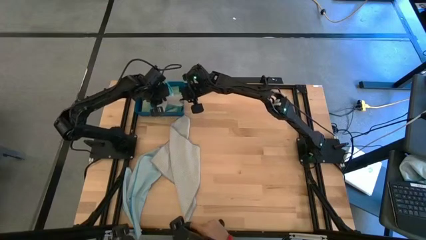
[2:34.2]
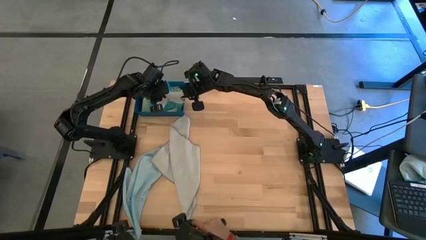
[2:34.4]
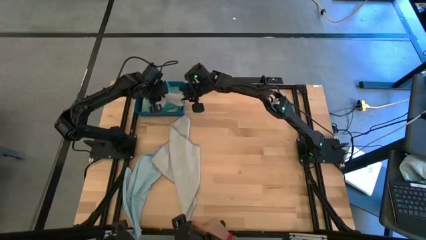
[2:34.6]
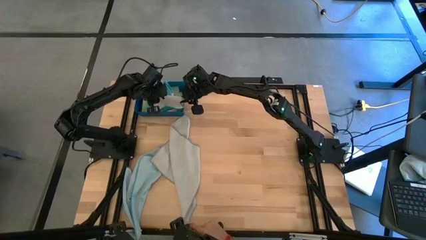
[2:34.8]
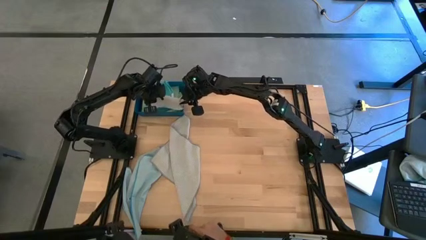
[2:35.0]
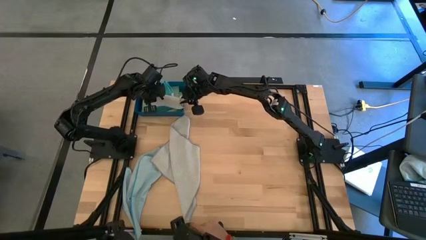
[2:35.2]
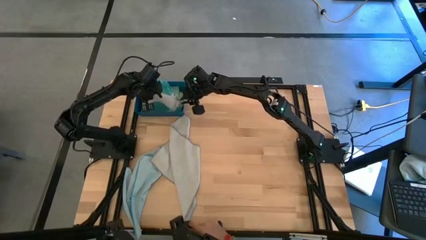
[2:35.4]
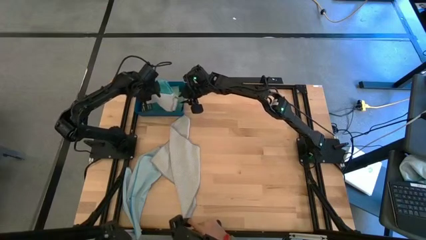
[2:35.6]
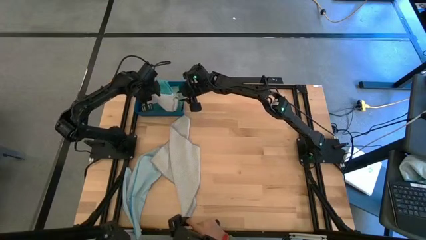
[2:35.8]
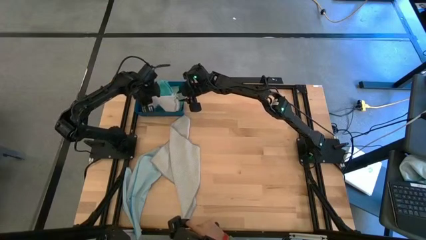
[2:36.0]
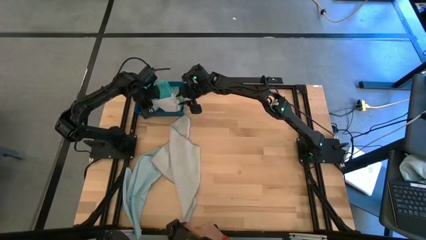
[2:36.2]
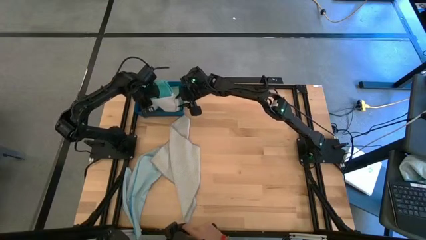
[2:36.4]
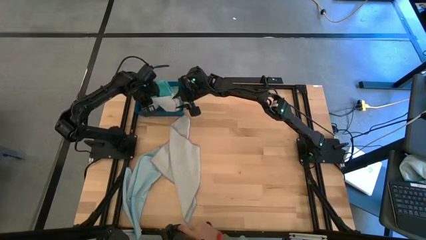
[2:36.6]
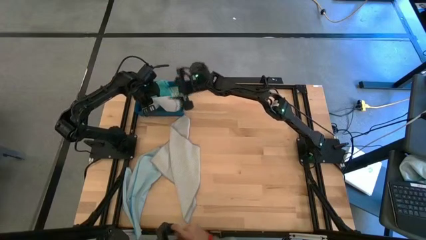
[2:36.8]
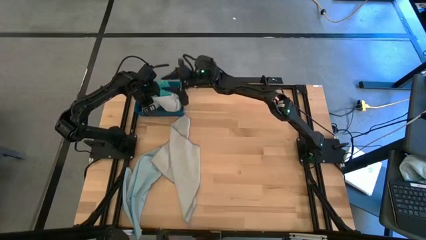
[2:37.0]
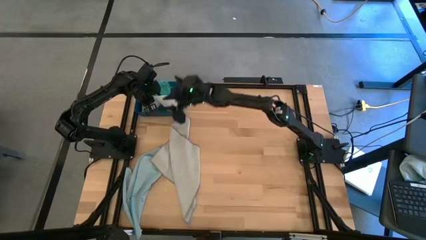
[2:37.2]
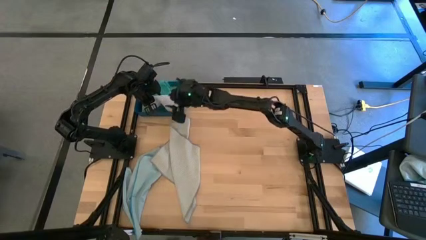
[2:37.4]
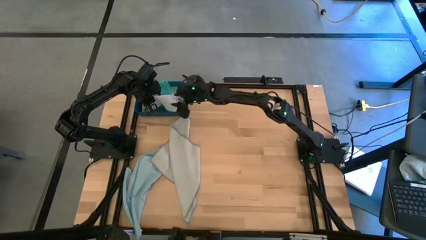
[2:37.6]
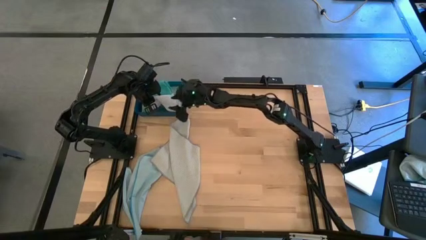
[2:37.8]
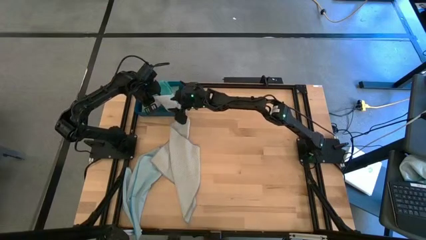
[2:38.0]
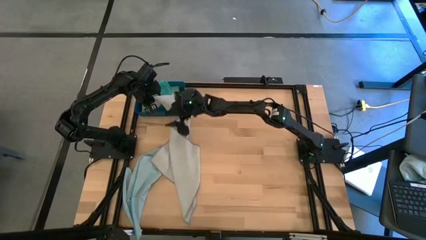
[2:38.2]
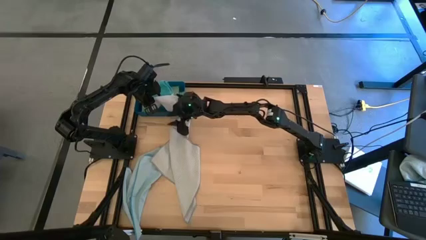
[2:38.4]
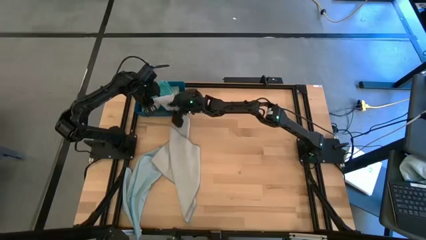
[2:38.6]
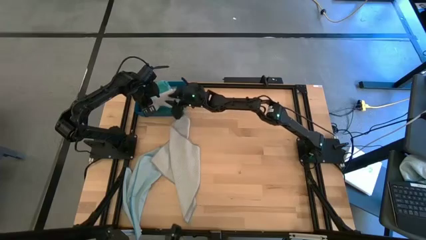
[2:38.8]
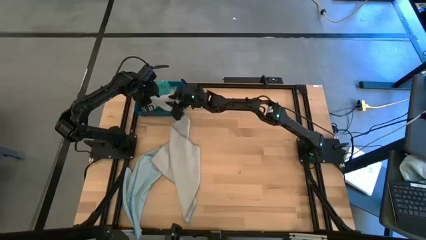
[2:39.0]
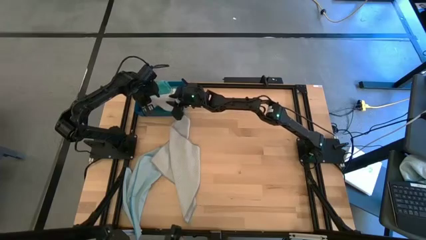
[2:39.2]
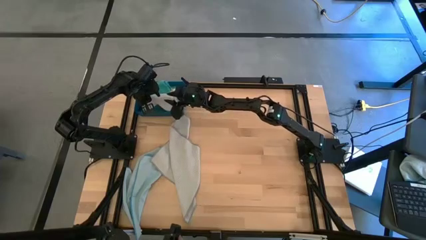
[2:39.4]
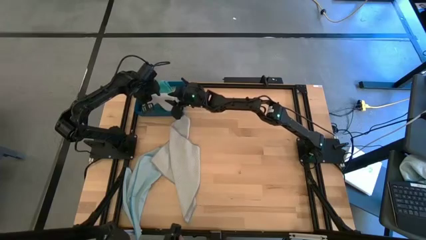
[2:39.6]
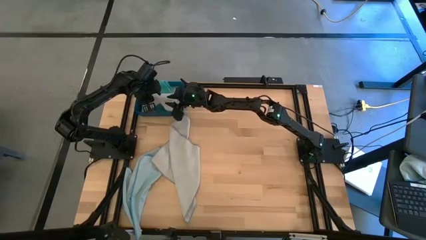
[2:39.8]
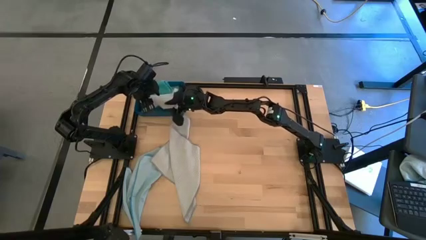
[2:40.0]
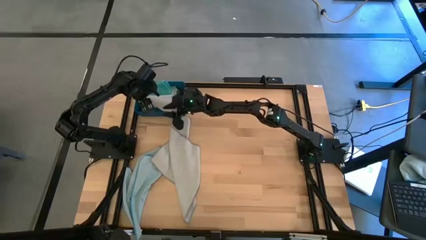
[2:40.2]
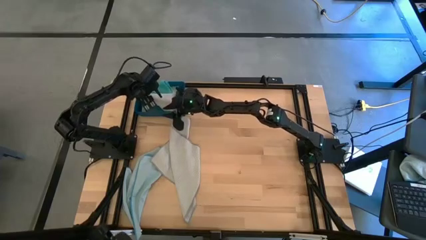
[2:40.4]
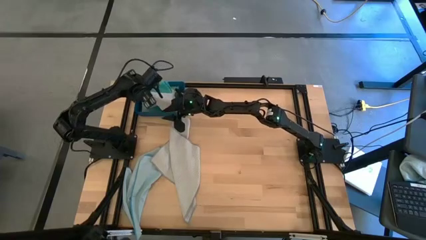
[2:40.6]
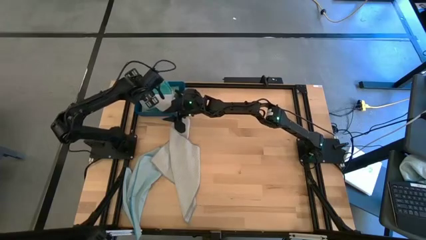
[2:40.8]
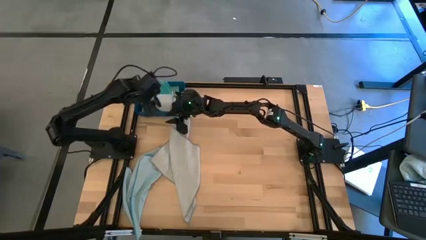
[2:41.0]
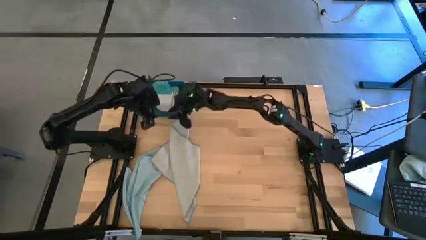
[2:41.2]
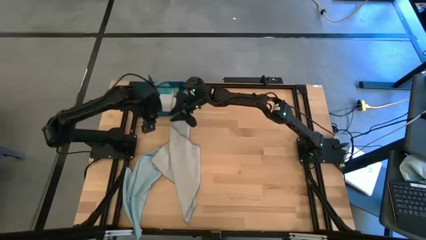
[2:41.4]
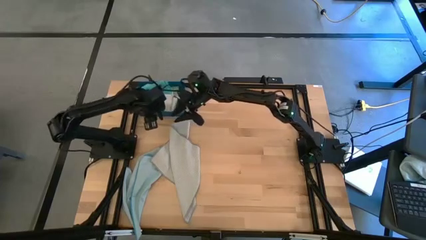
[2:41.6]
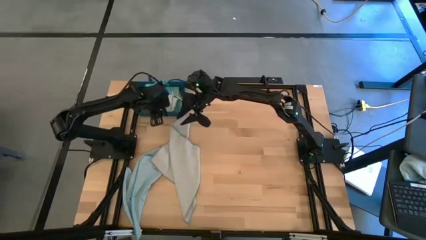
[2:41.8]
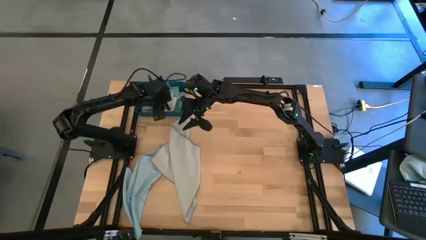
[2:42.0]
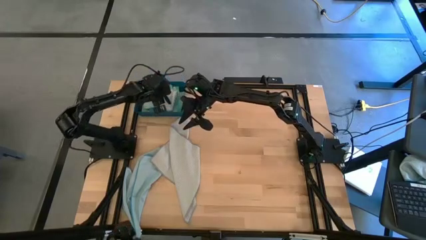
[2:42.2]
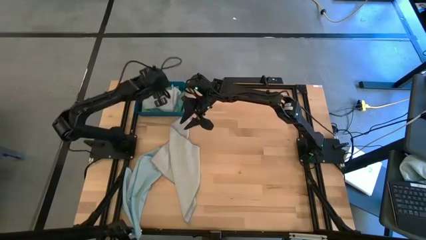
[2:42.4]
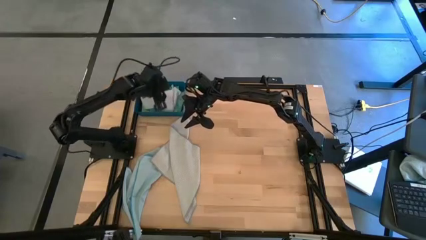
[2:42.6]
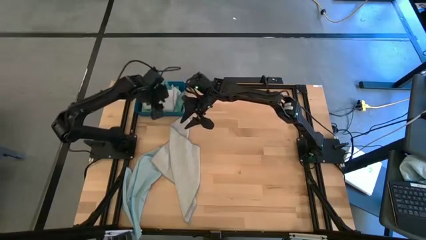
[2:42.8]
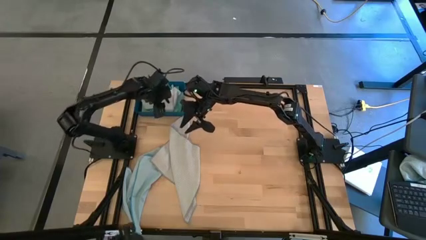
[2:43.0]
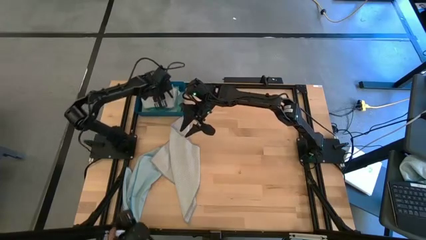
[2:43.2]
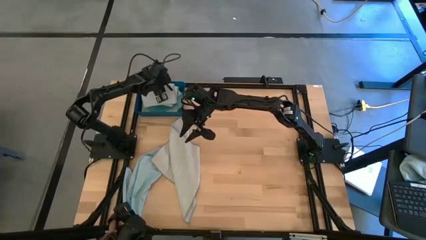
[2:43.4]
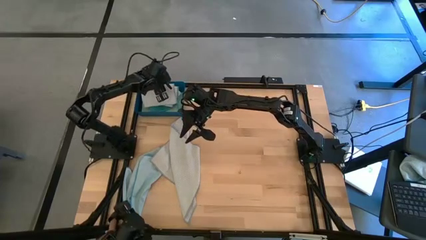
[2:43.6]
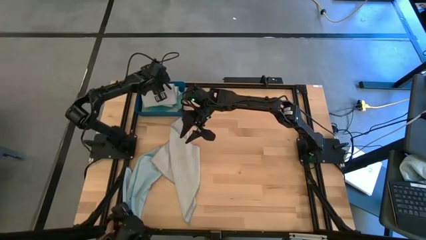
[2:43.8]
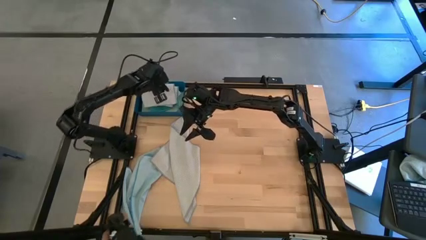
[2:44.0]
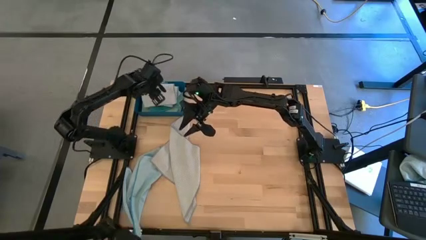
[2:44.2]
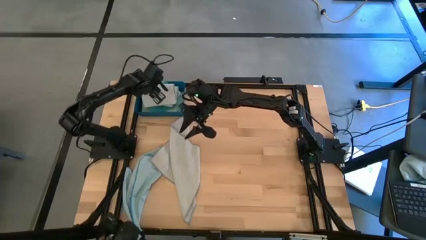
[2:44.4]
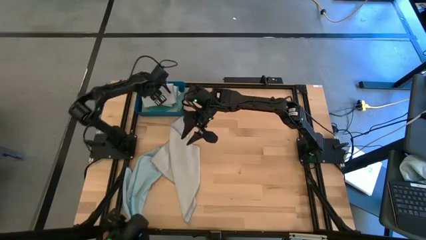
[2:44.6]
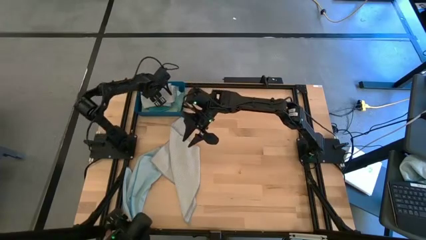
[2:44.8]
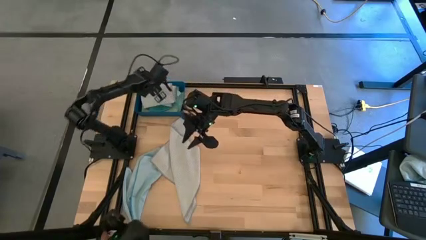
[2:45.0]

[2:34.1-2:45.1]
Task: Fold microfiber towels
Put the right gray towel into the blue bin
